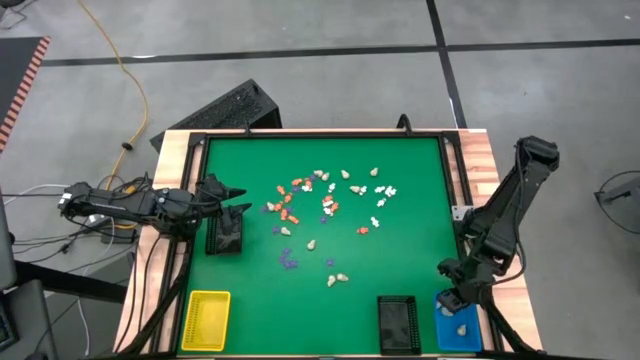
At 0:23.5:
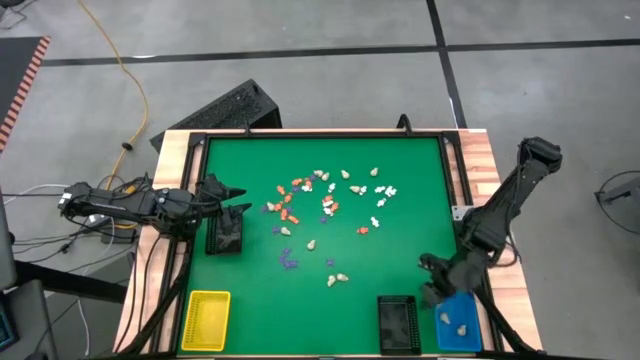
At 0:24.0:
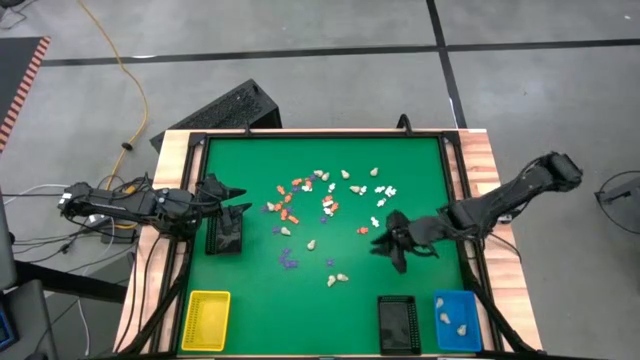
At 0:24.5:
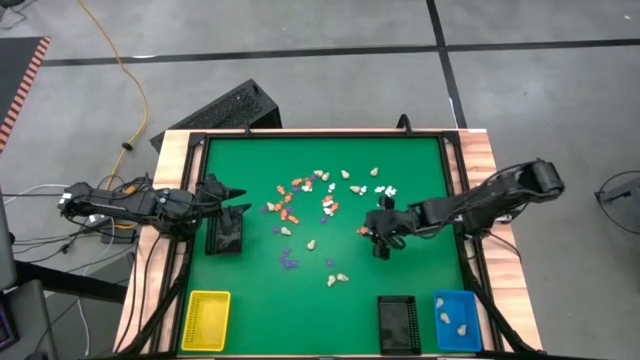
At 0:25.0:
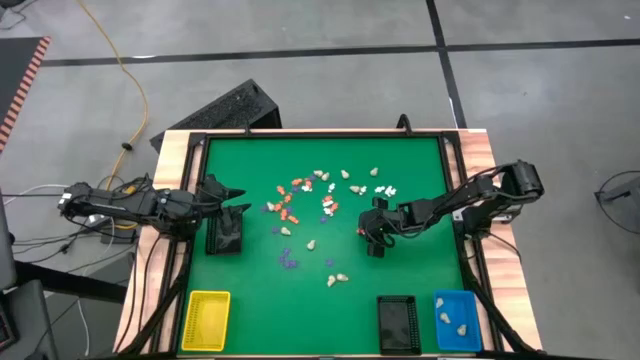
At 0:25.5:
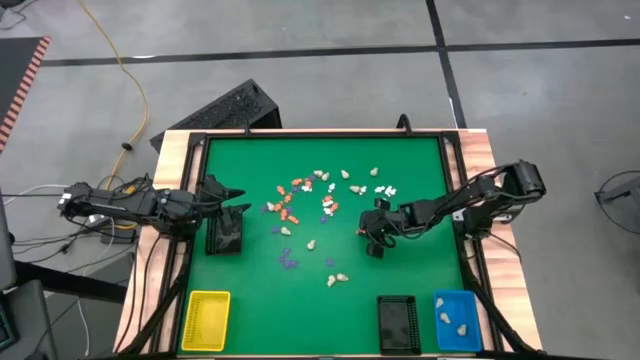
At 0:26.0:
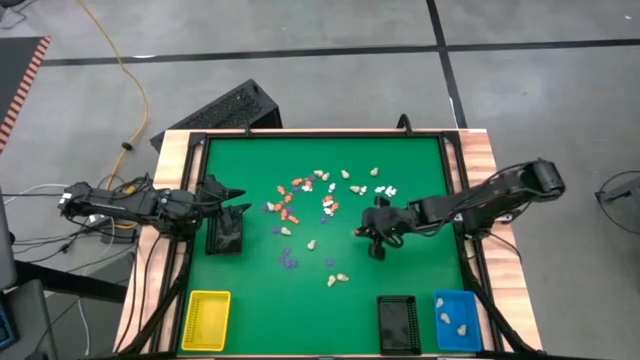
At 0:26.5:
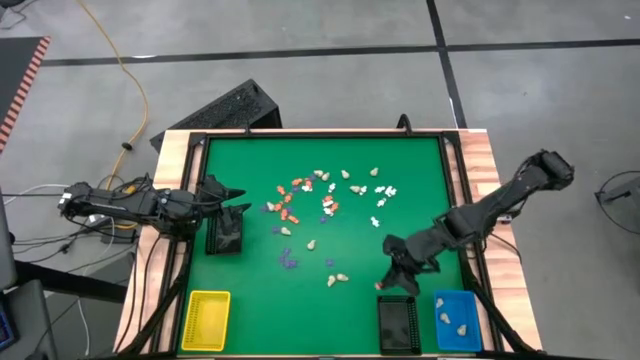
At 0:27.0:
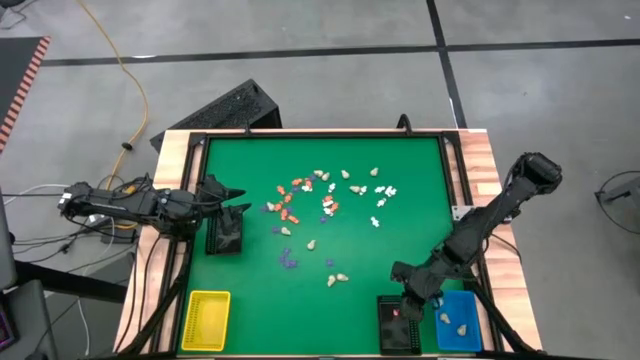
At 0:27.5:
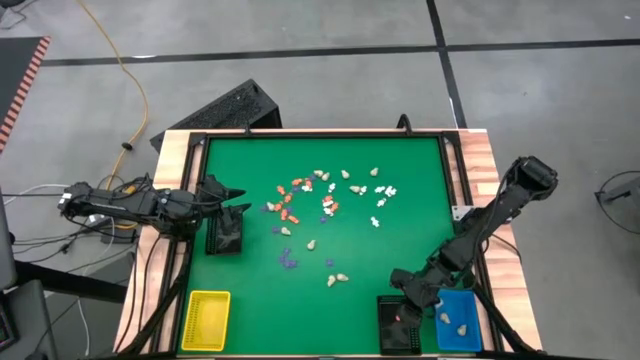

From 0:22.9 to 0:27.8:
Task: Sort Halloween decoration
Put the orange skeleton toy into the bottom black basket

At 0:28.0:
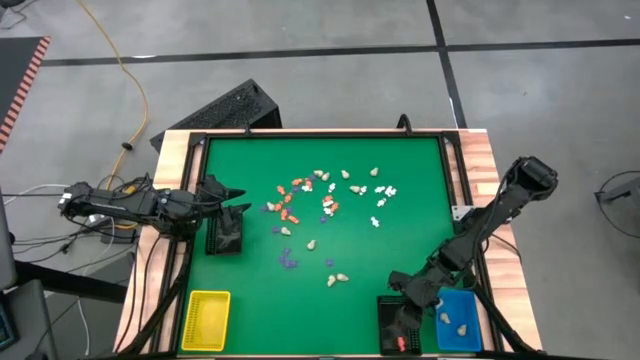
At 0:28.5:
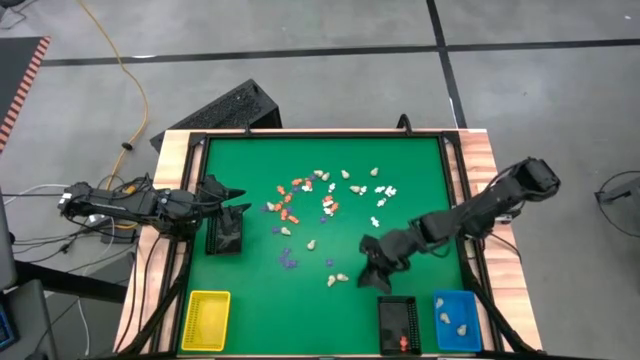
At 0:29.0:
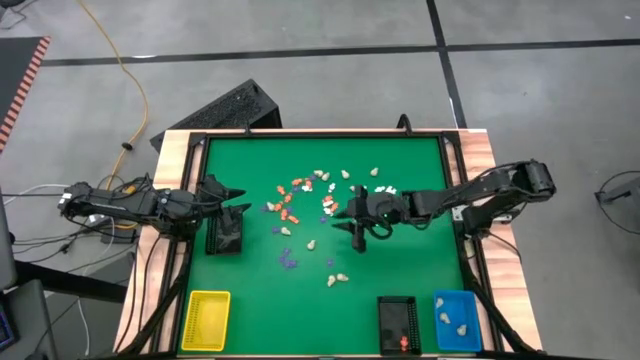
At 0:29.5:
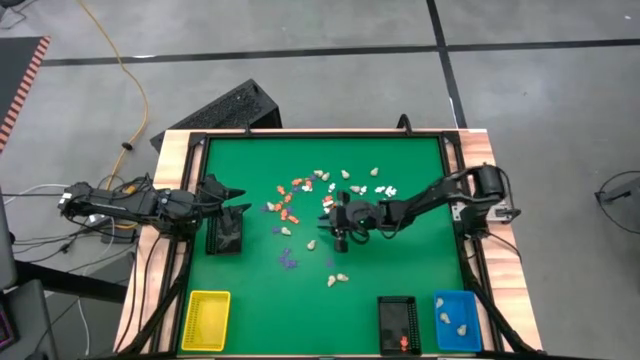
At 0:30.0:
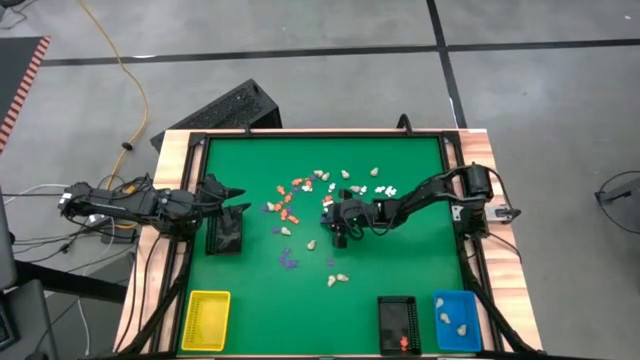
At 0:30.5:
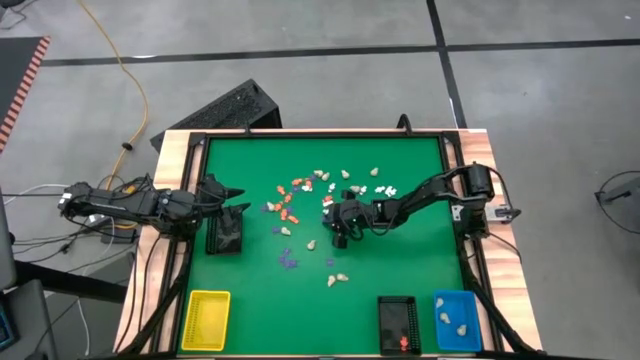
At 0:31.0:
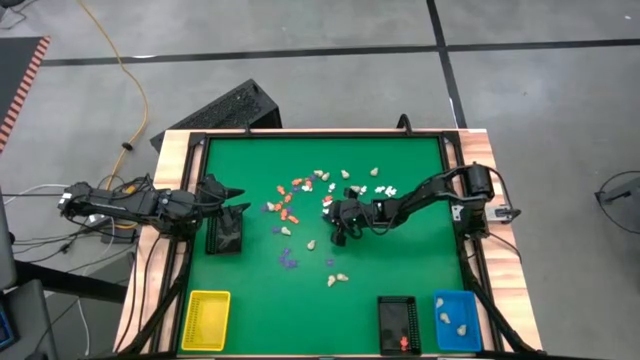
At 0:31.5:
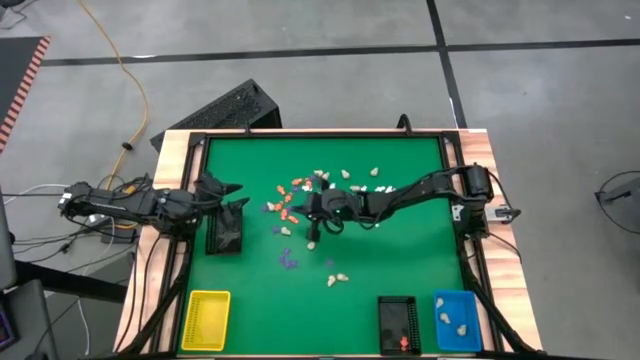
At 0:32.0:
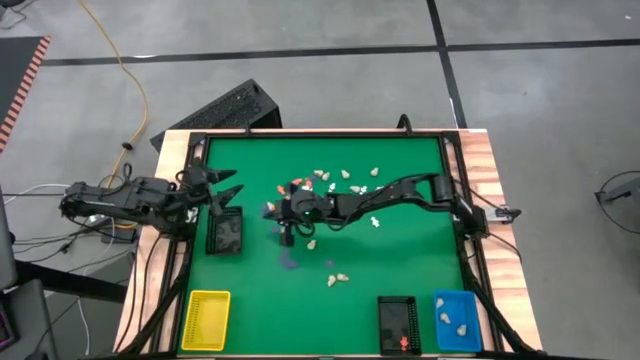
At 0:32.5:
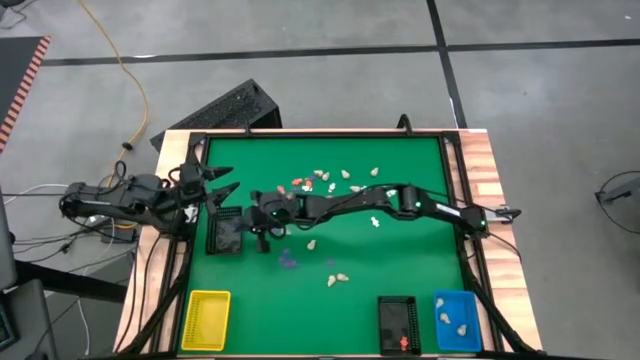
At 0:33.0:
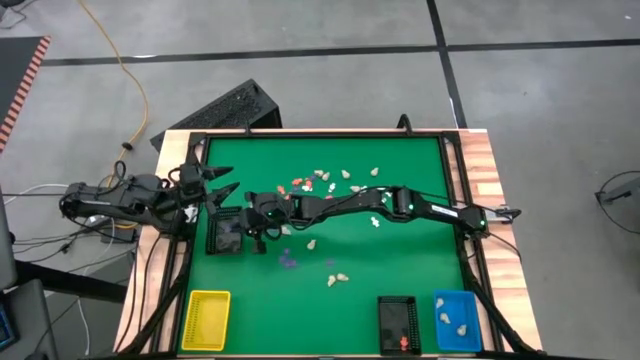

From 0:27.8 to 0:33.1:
Put the purple spider toy into the top black basket

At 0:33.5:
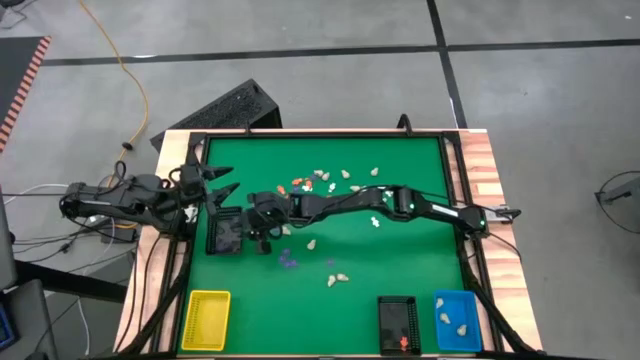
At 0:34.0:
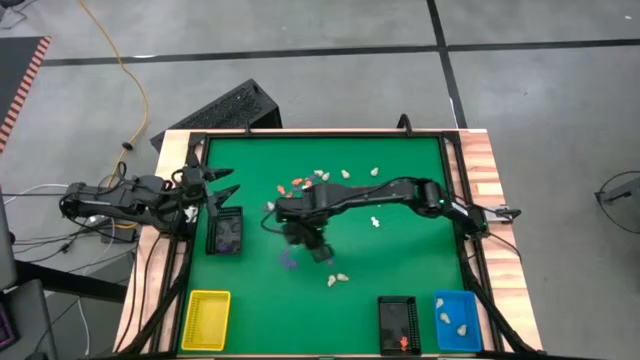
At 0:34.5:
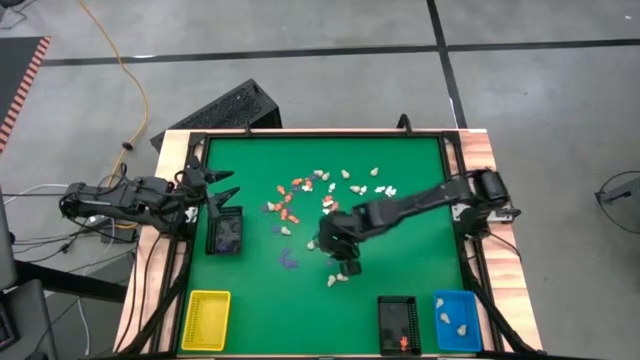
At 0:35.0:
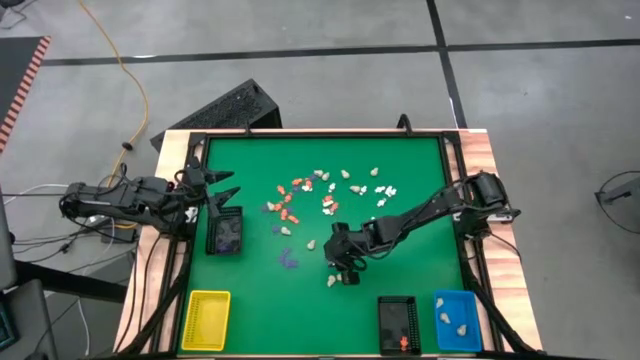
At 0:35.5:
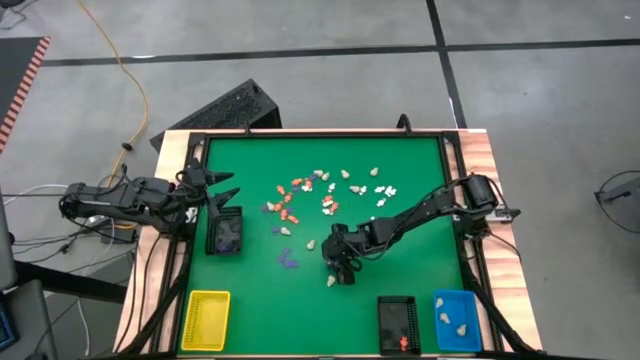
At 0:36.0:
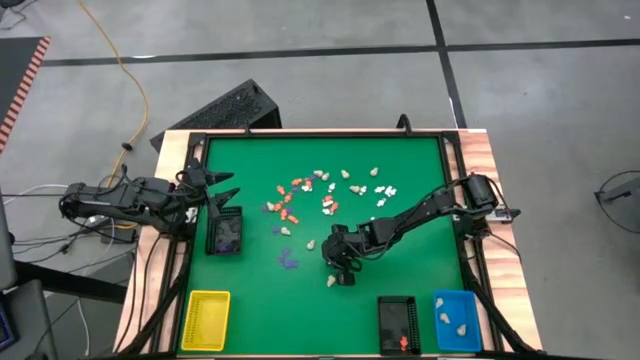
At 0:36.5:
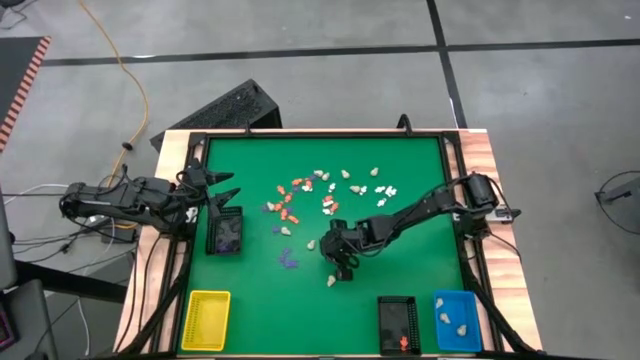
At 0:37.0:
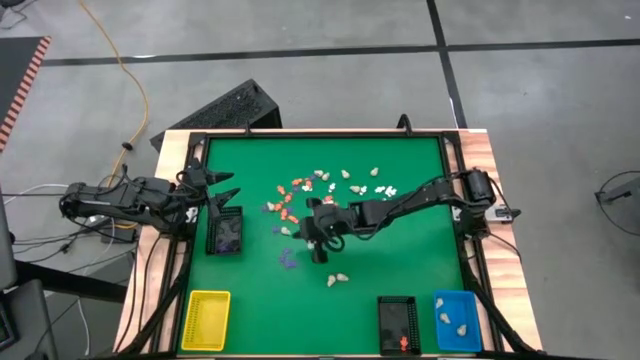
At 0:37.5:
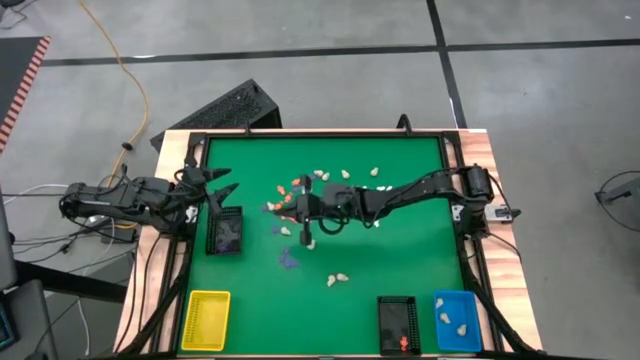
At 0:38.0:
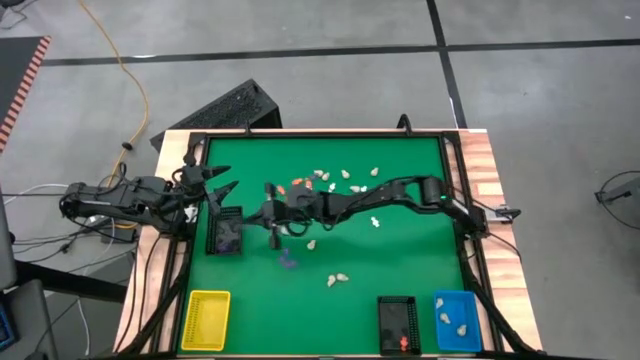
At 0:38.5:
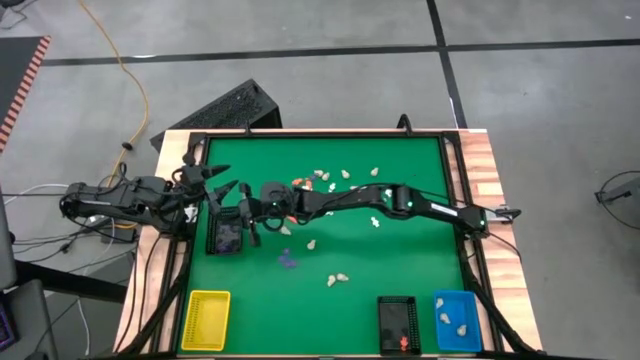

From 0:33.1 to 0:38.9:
Put the purple spider toy into the top black basket

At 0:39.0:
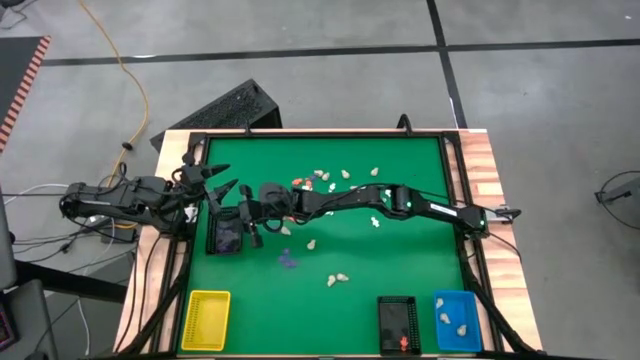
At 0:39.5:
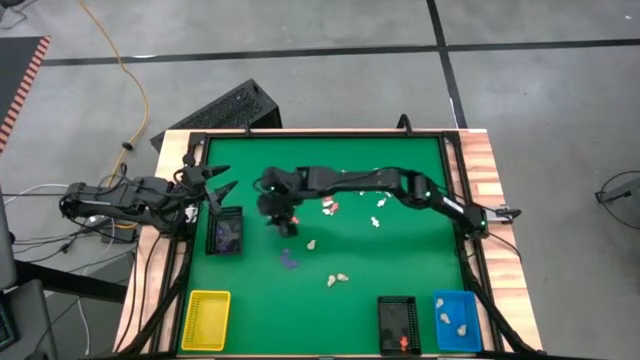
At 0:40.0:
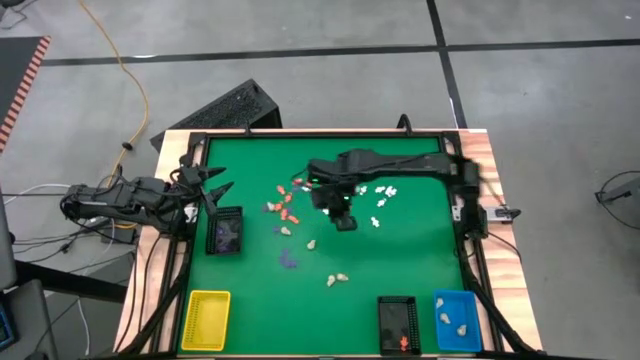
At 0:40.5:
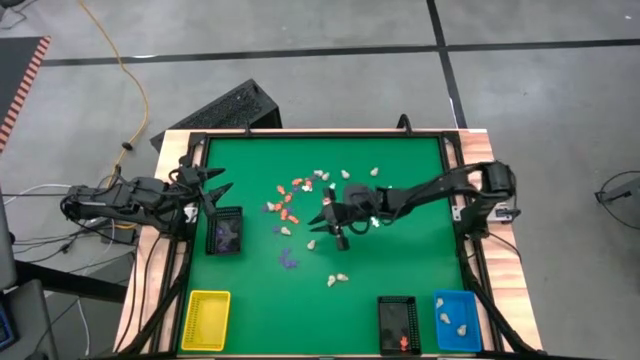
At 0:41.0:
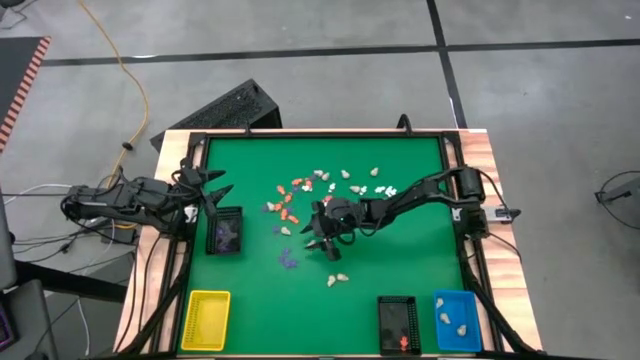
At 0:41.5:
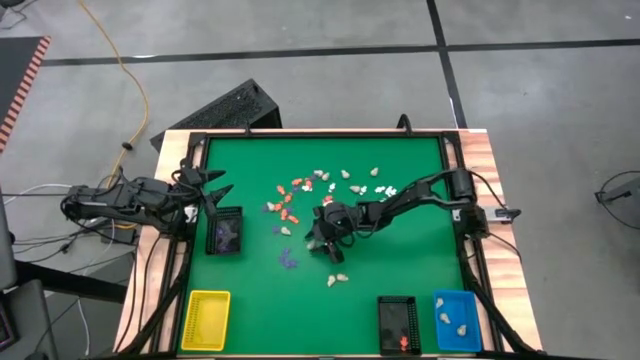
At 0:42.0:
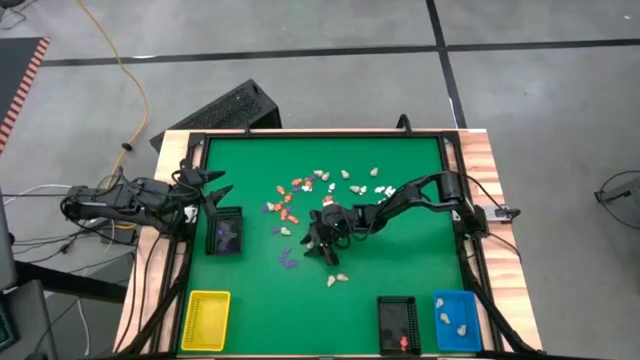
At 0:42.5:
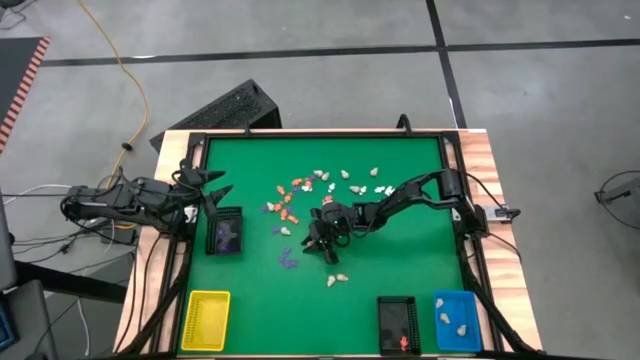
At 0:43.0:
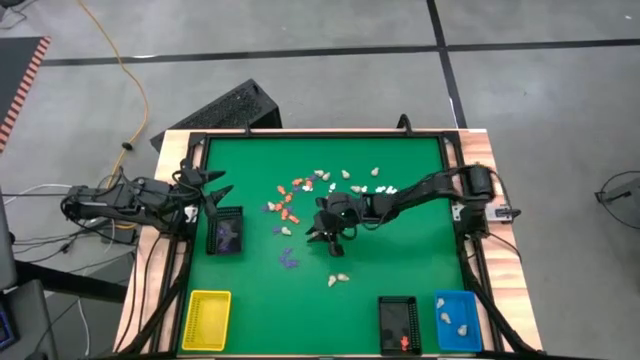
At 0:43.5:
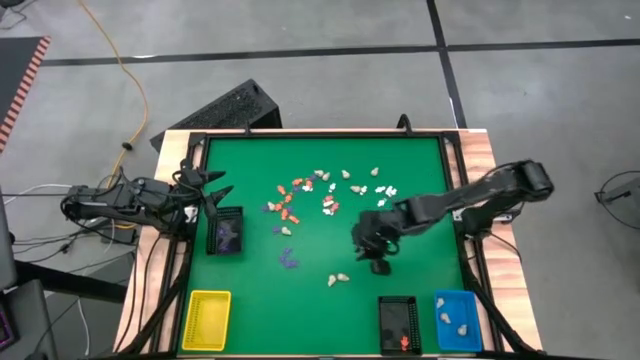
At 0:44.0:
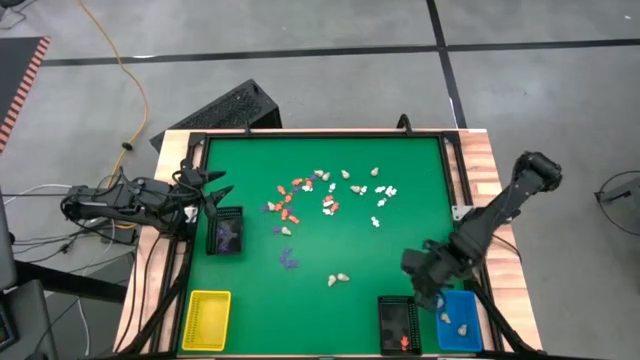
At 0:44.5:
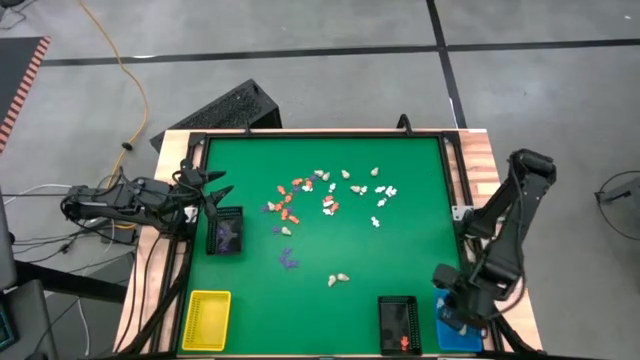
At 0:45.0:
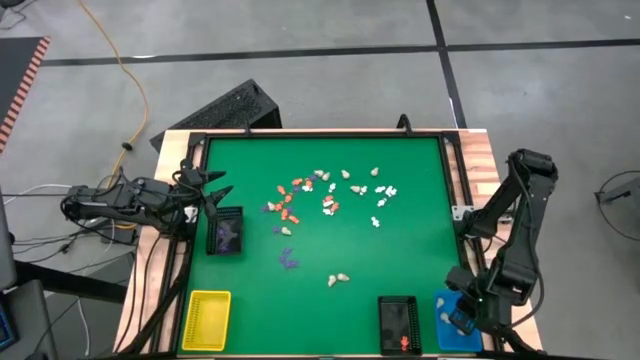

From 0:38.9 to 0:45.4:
Put the white skull toy into the blue basket
